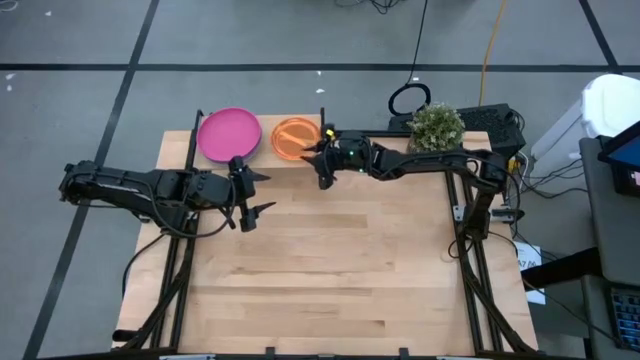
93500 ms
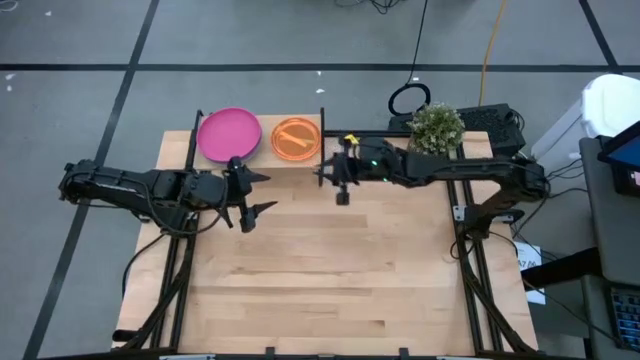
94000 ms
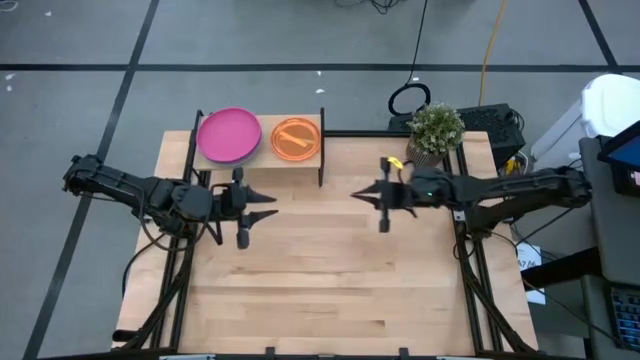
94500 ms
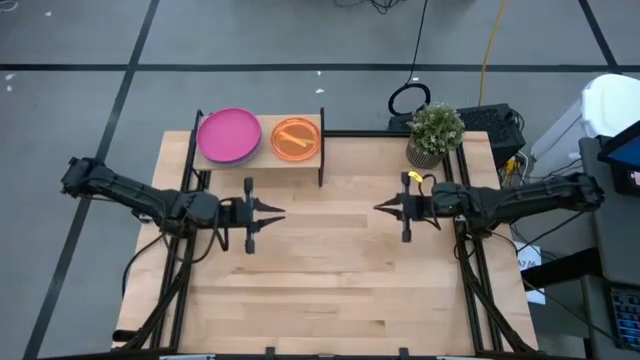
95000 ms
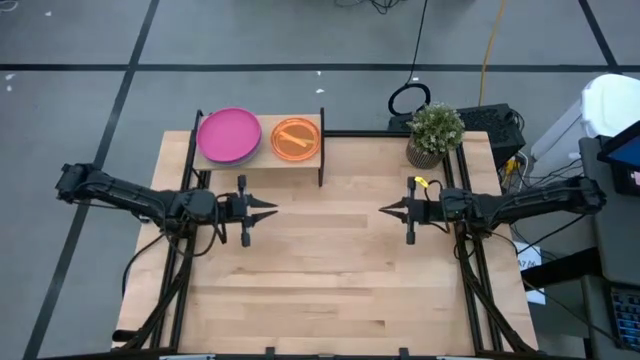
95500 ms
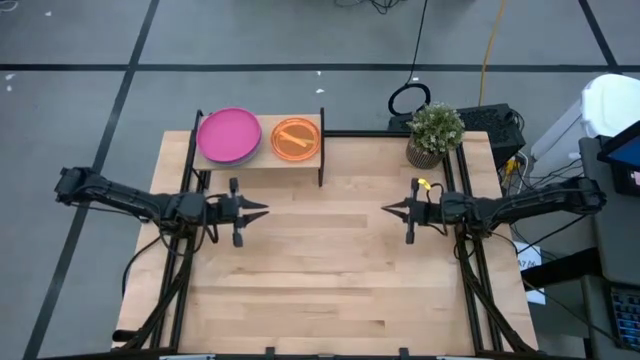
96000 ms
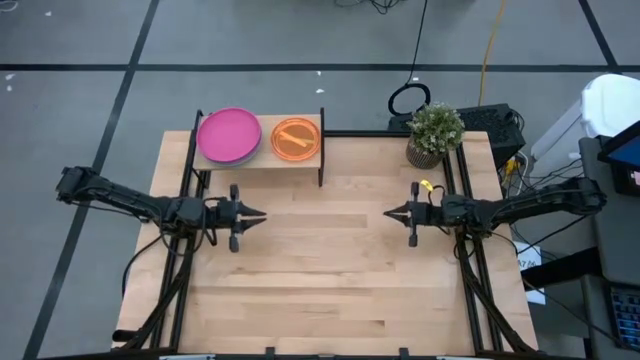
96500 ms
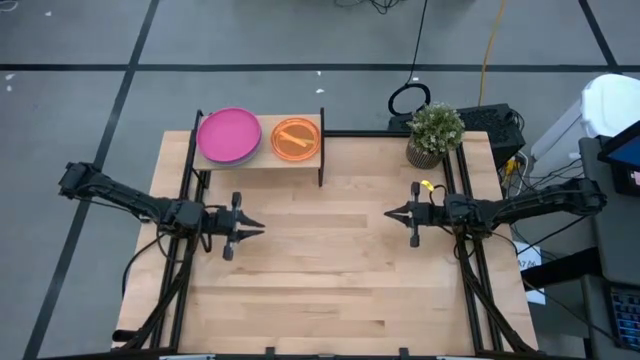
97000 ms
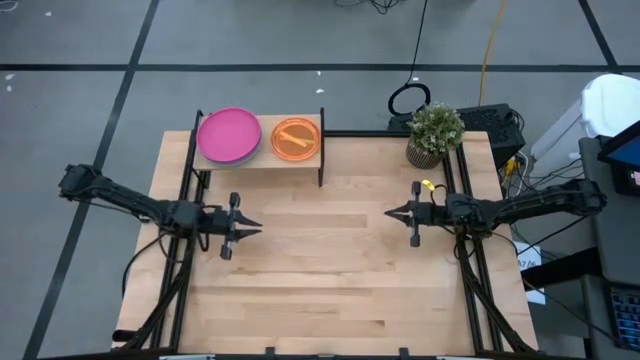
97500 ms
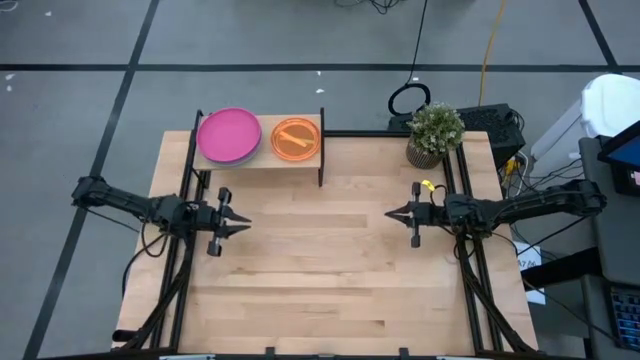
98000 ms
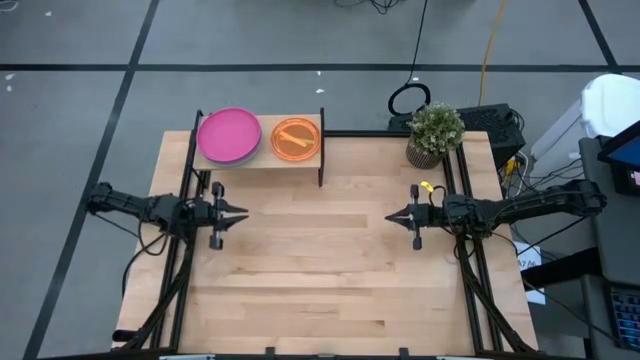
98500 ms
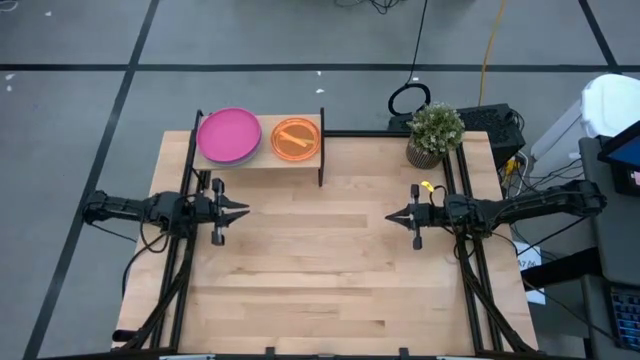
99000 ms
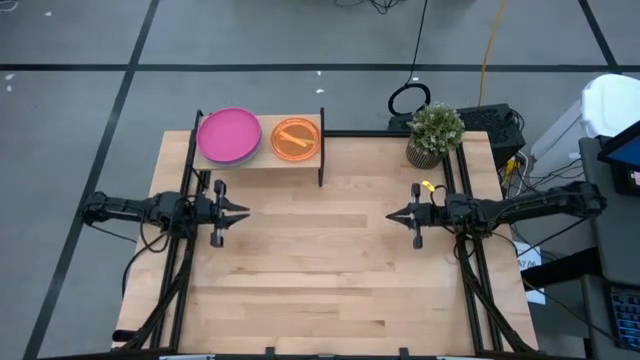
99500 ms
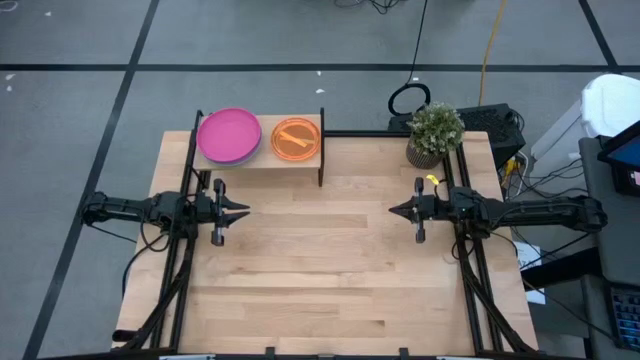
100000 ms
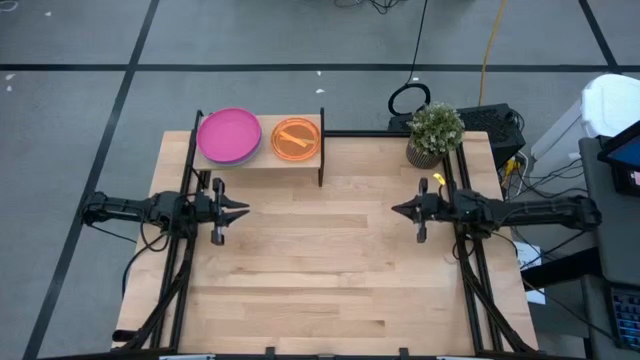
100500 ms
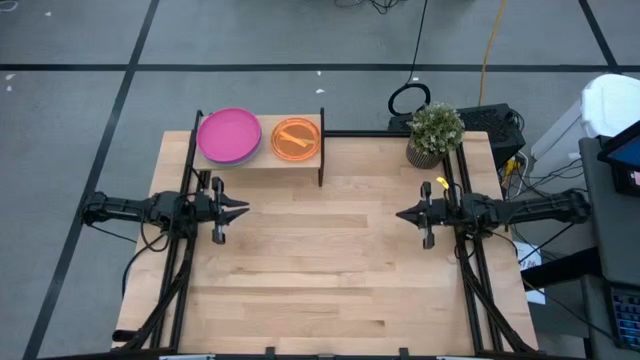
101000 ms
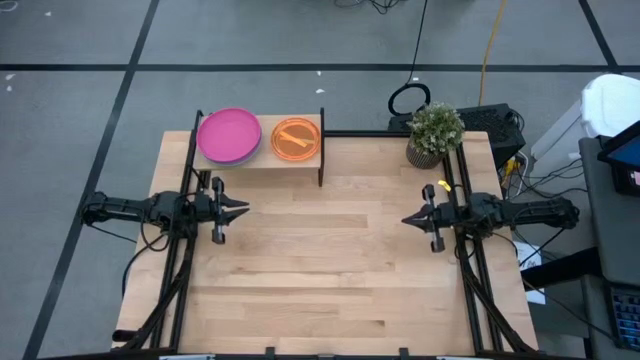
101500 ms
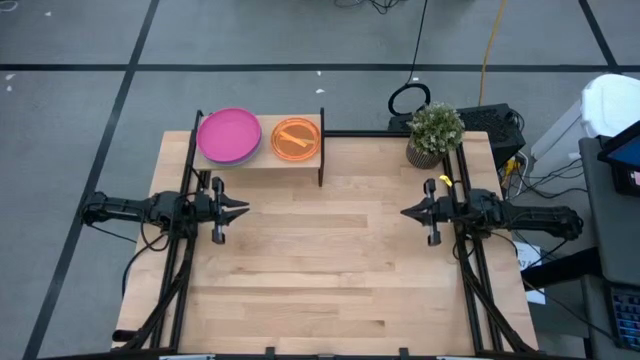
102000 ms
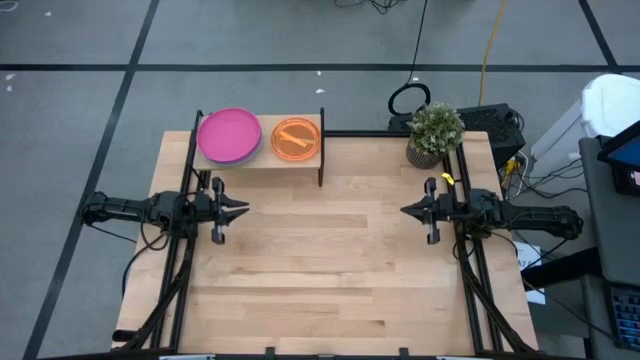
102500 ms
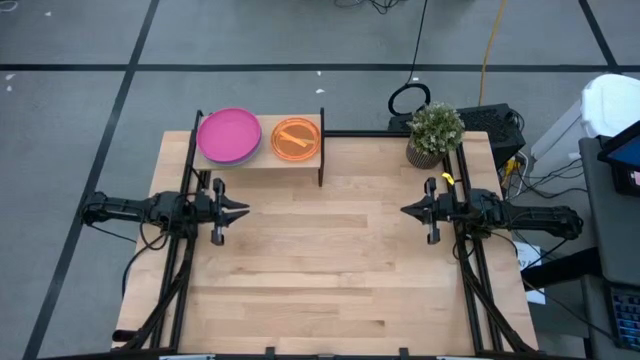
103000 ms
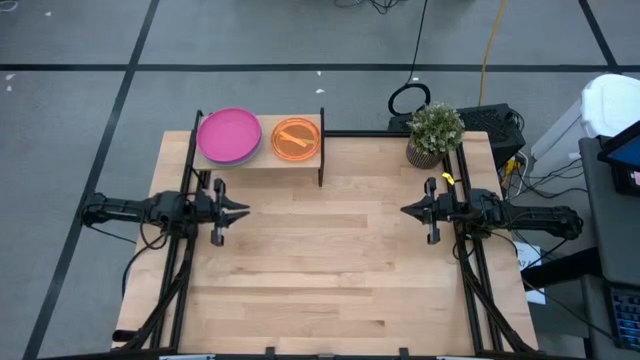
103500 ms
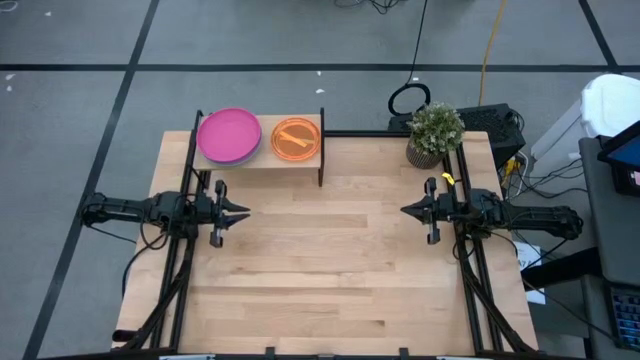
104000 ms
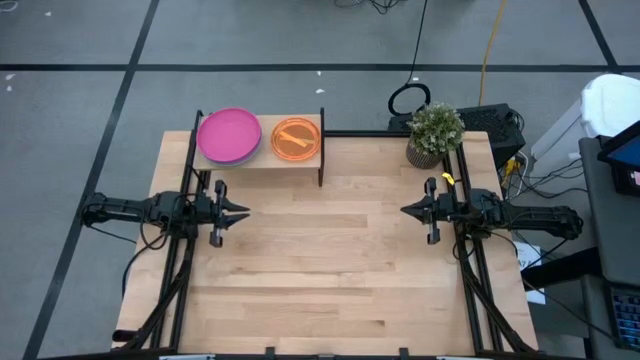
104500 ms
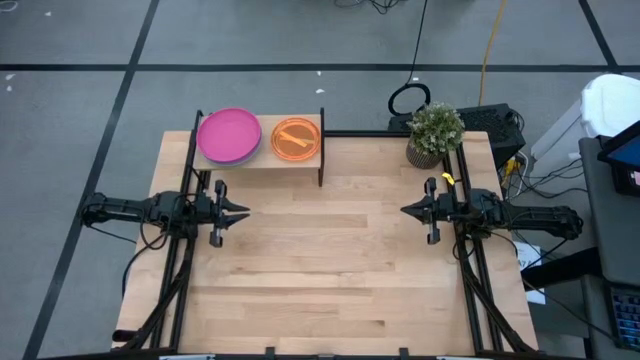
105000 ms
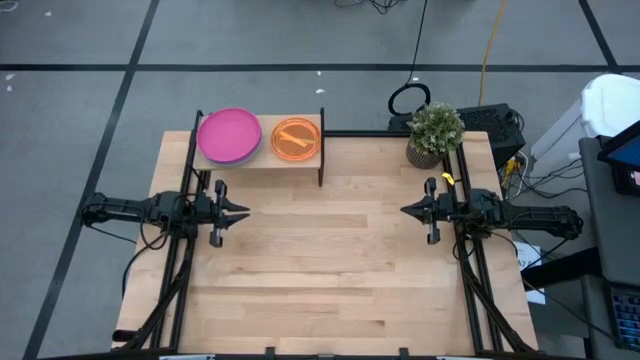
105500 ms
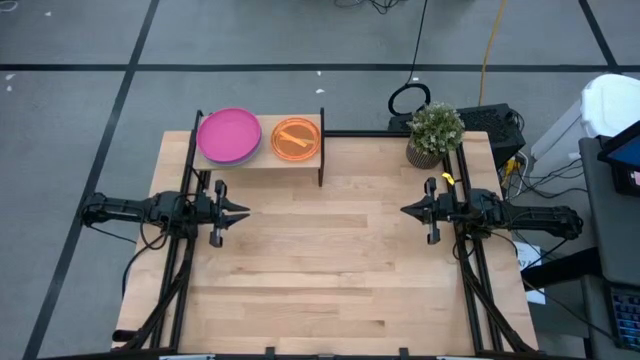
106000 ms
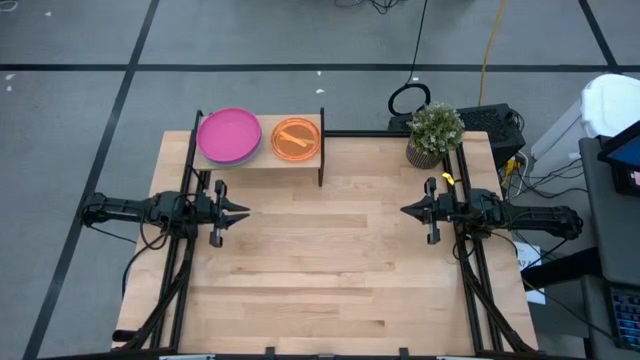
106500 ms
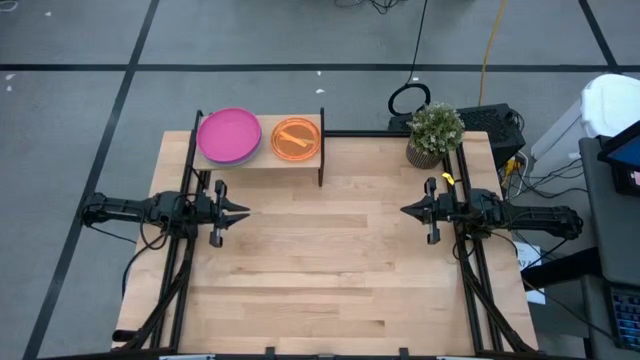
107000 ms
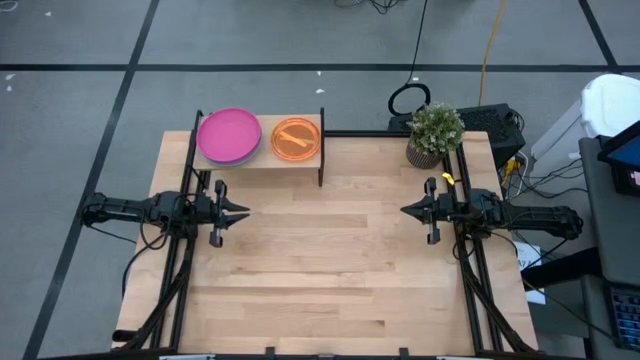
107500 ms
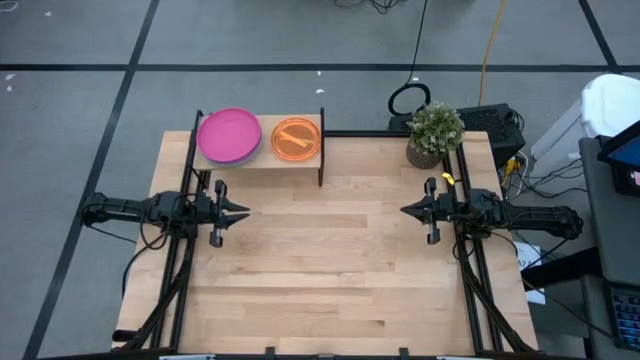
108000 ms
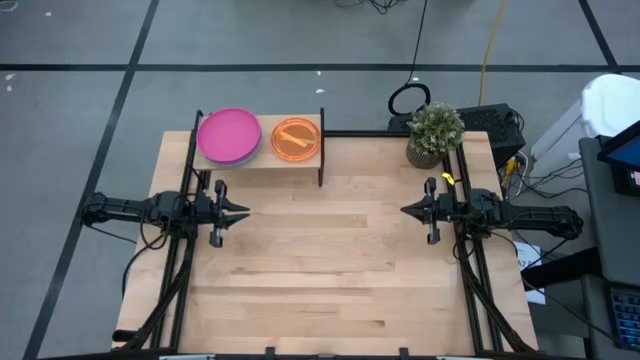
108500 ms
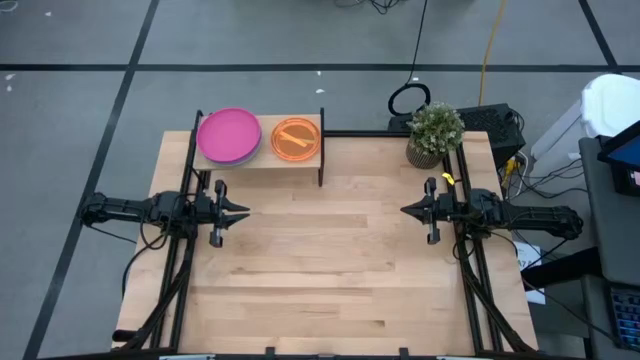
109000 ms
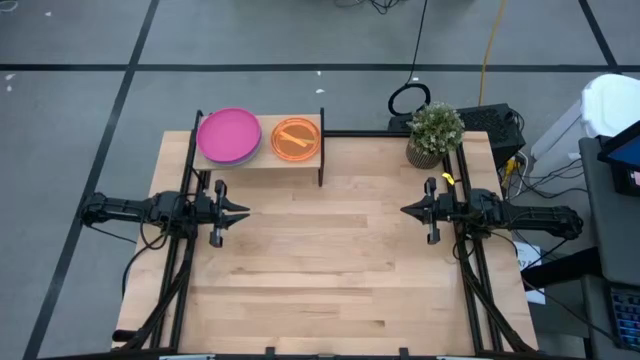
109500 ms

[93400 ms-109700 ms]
Task: Place and stack plates onto a shelf
Return to Home Position

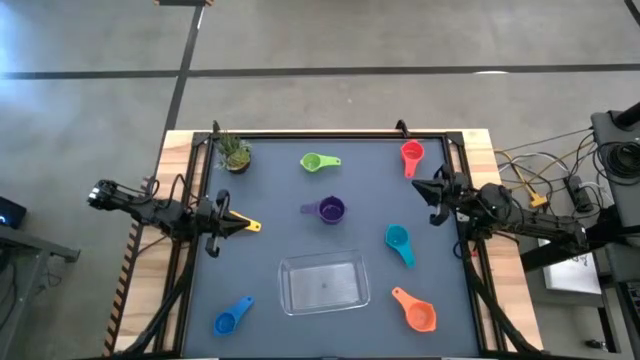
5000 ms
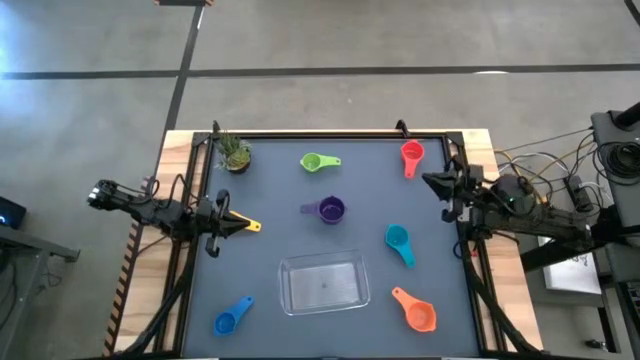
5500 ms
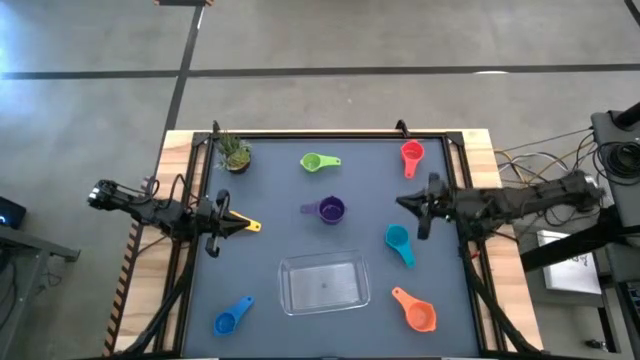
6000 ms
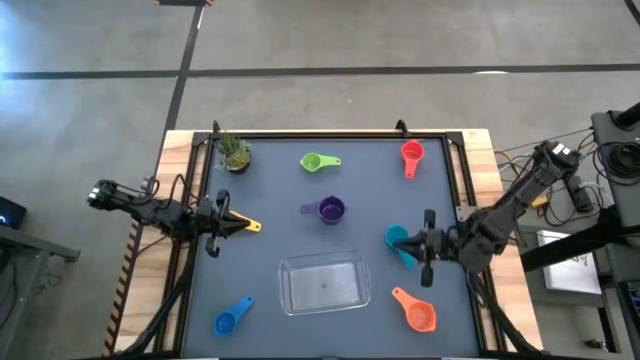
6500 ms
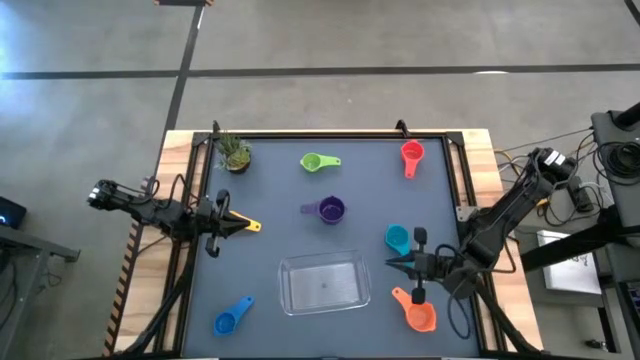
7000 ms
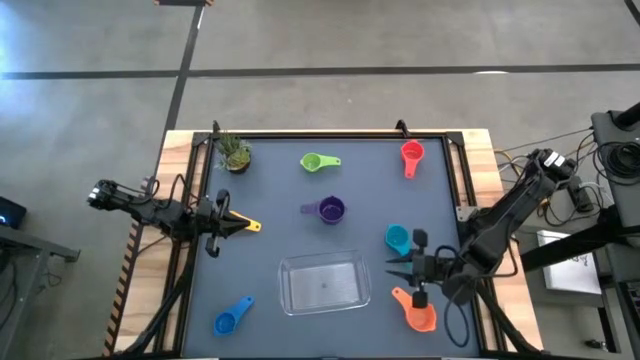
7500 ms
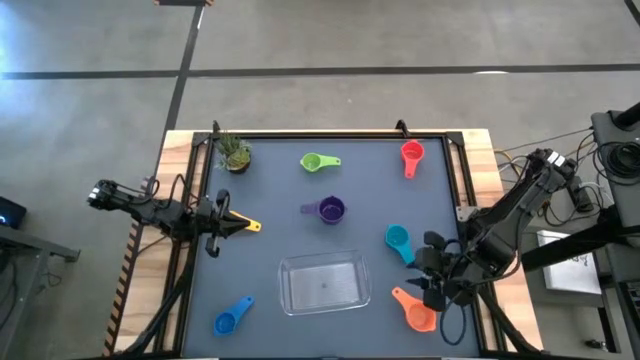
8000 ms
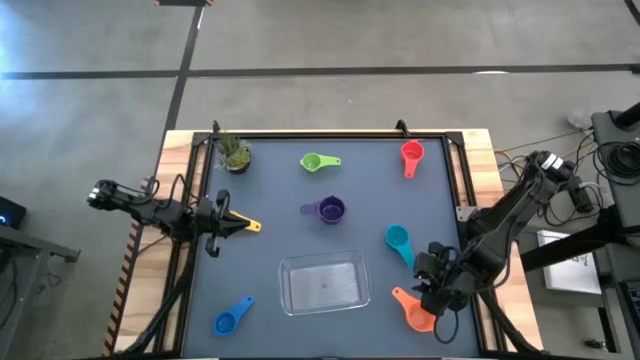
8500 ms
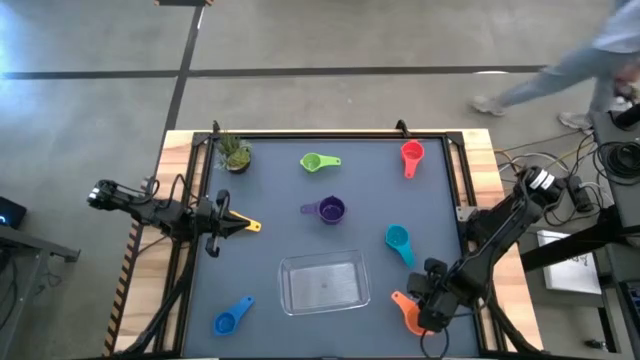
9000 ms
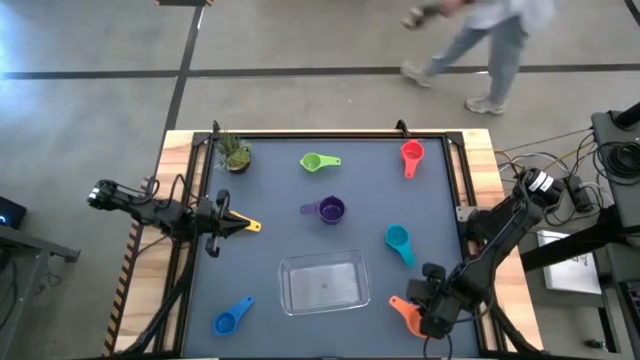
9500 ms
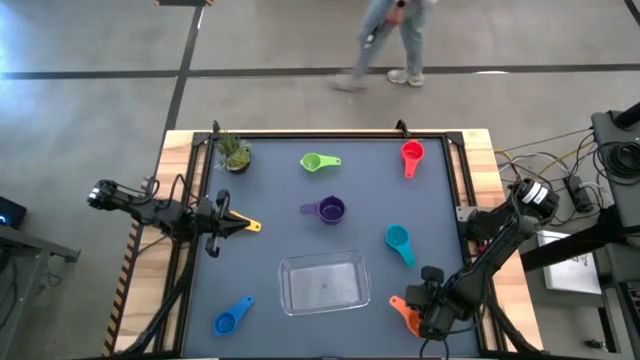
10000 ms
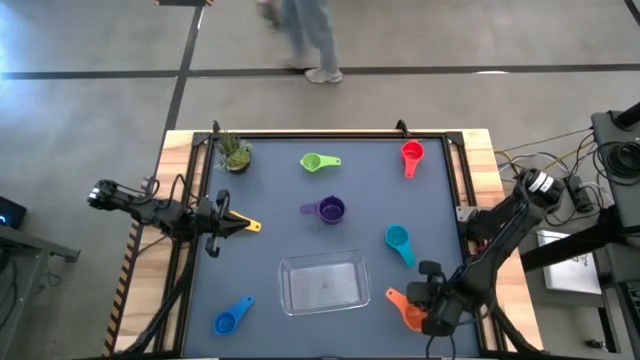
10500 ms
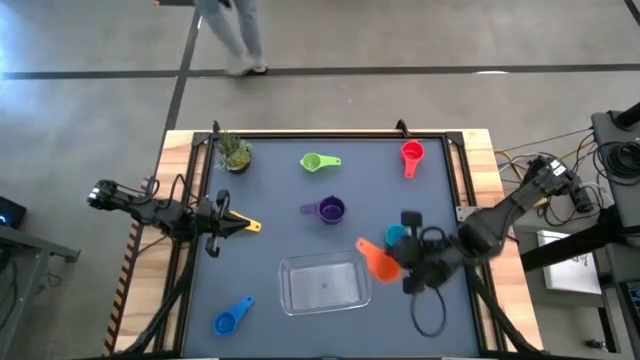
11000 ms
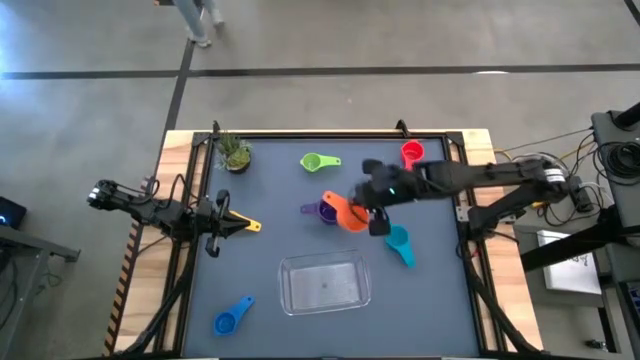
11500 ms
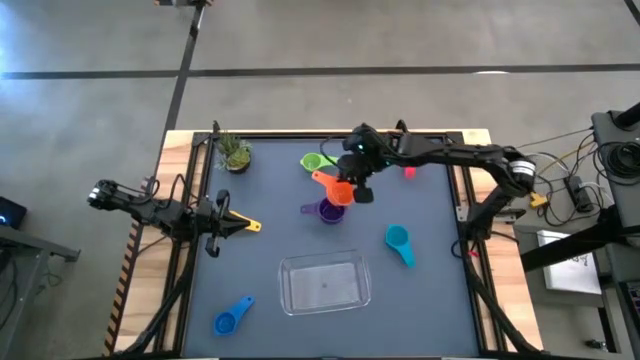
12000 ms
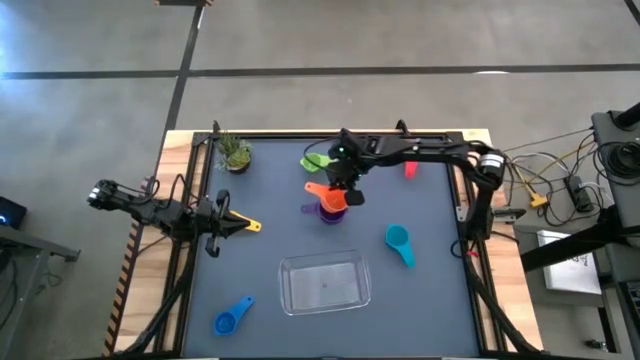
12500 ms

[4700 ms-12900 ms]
Task: Nest measuring cups in basket
Stack the orange measuring cup on top of the purple measuring cup
